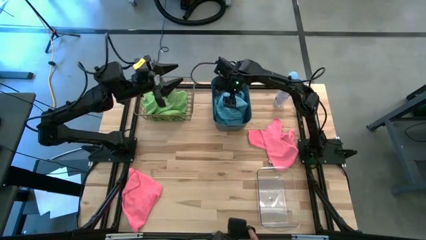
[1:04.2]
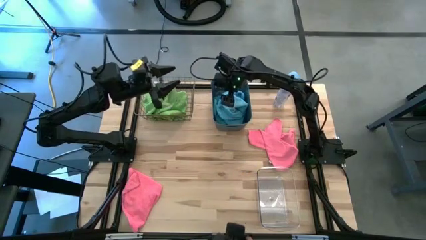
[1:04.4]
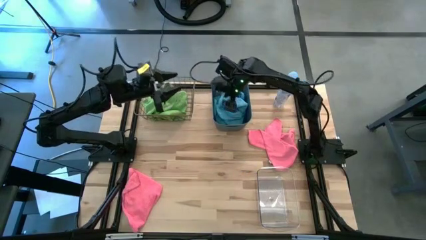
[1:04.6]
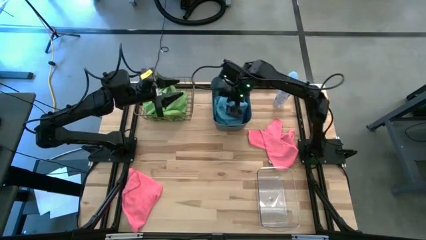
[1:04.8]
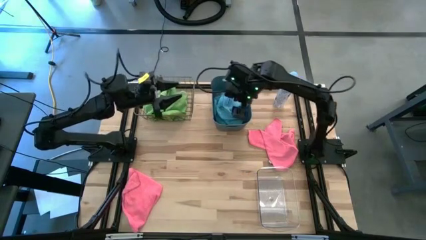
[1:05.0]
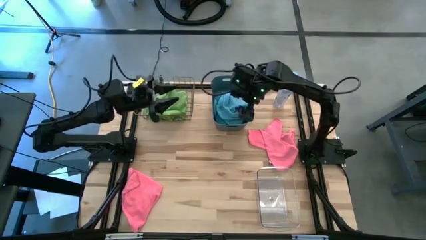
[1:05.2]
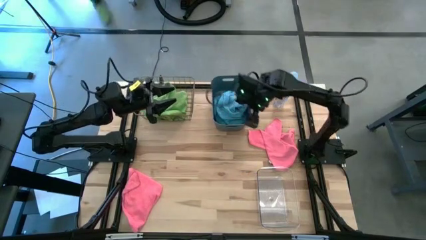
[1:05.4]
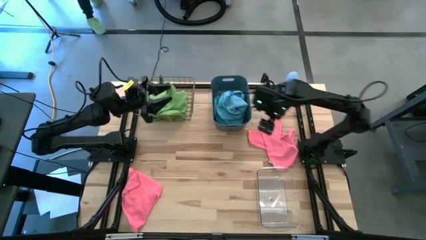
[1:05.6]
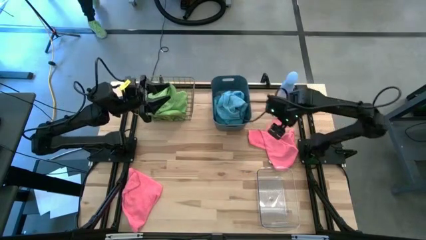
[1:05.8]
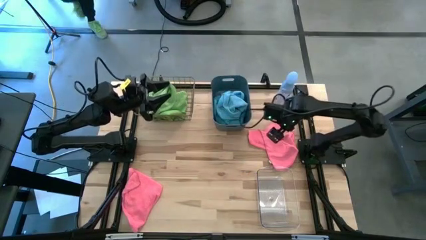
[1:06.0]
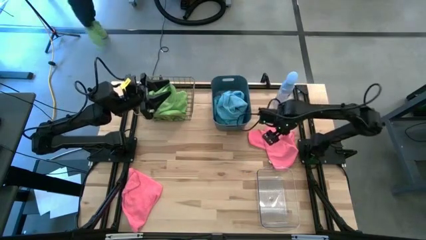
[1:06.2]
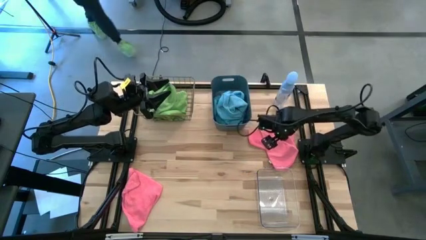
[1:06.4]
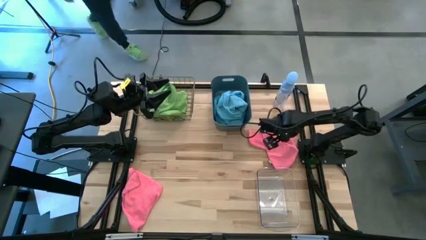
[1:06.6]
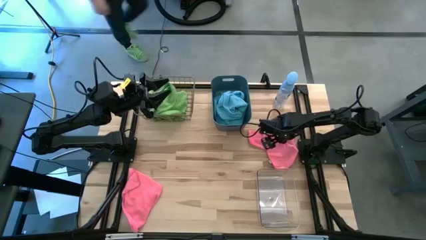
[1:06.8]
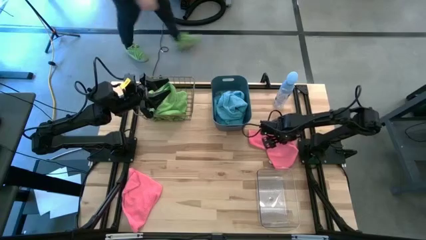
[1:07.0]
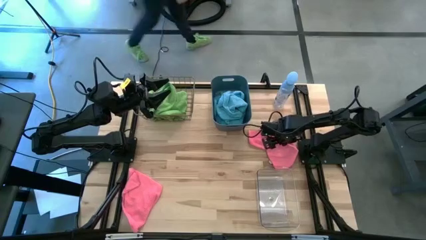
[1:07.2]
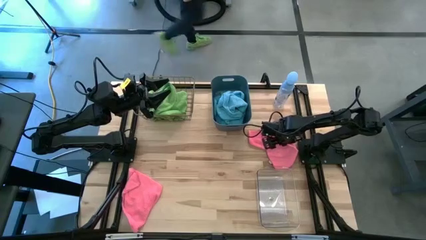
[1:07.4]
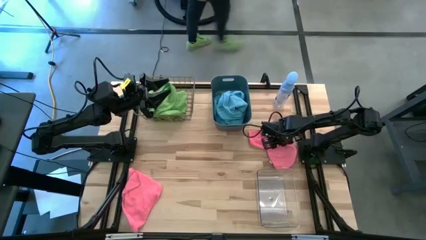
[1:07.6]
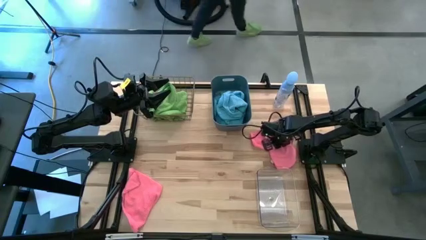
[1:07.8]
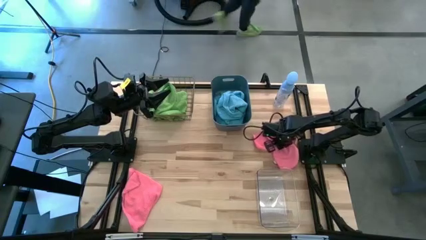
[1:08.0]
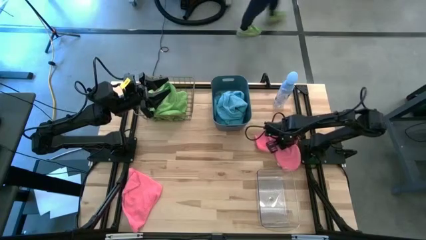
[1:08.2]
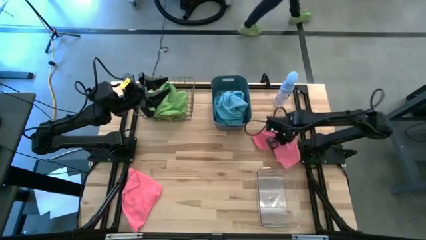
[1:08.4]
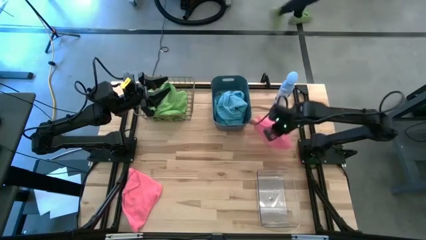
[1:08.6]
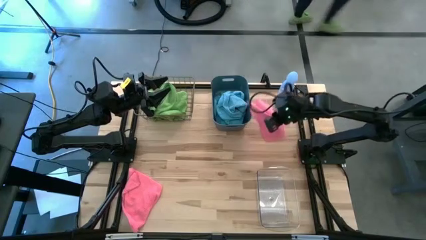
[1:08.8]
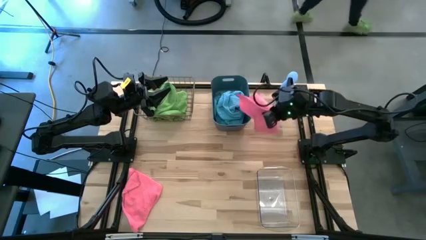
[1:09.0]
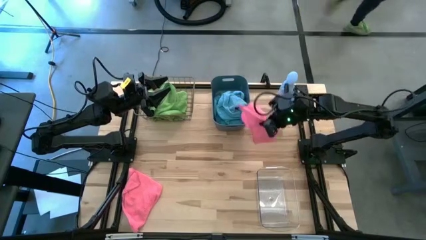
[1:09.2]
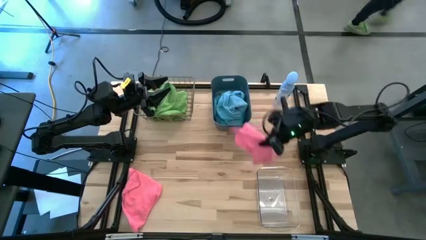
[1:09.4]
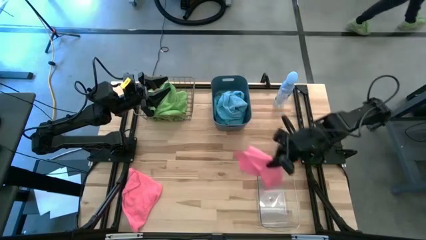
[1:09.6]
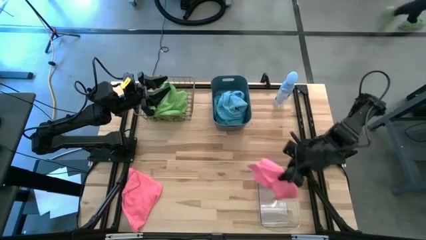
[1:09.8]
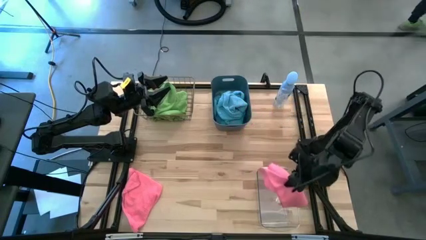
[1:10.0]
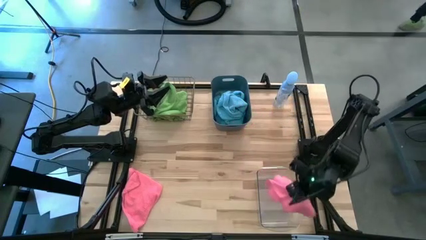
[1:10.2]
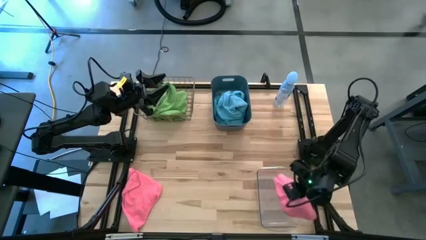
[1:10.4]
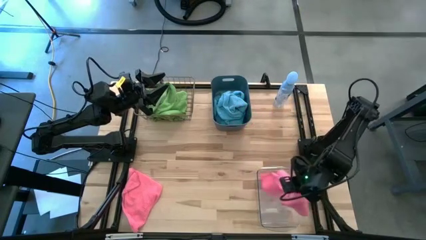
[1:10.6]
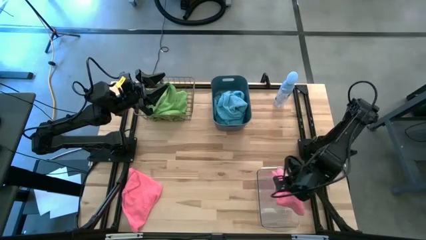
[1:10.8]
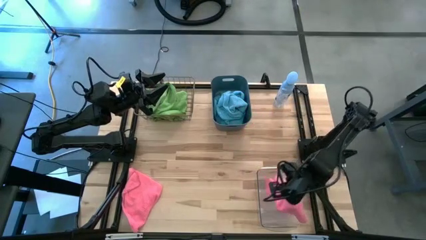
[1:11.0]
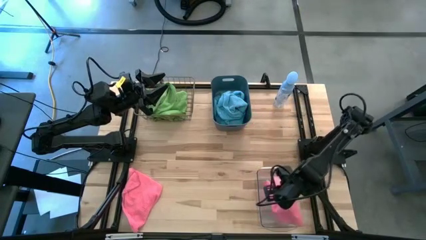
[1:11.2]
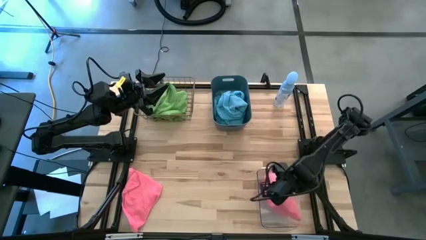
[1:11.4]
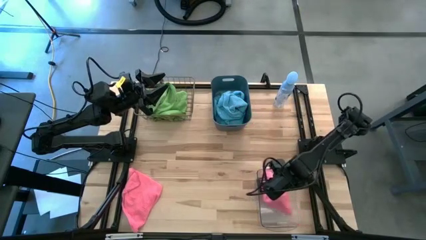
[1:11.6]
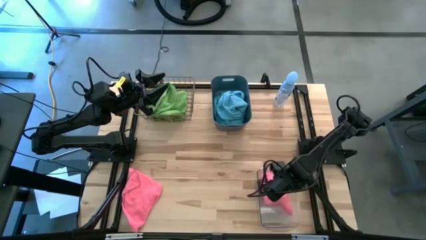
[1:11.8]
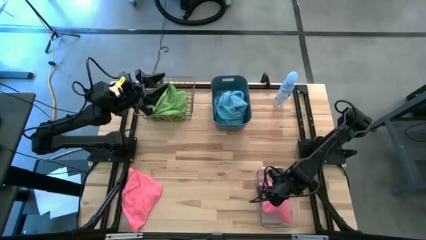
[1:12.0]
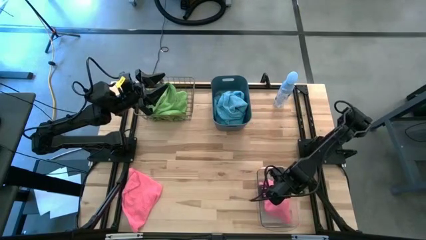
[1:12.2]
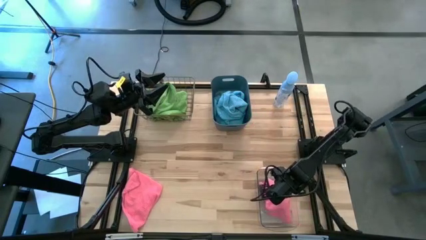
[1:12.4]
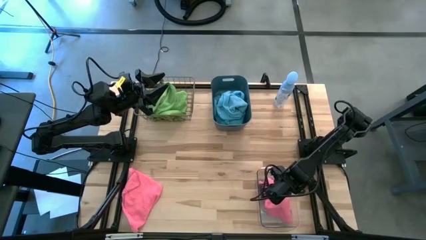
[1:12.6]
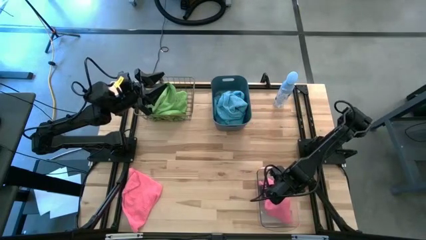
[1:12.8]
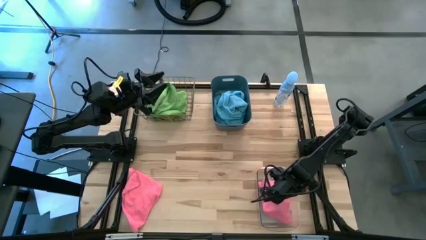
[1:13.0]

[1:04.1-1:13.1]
Task: Sort microfiber towel by color & place in baskets
Put the top pink microfiber cloth into the transparent bin

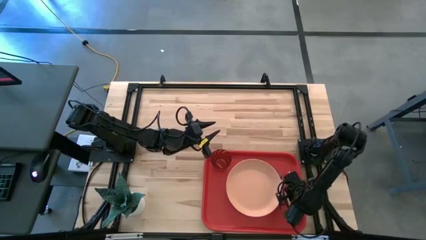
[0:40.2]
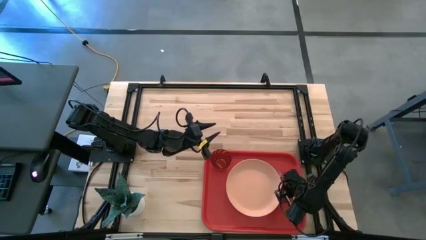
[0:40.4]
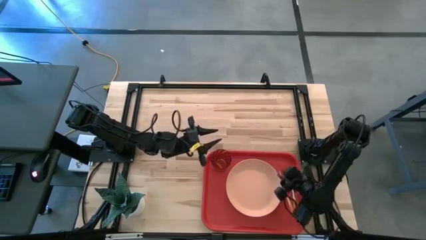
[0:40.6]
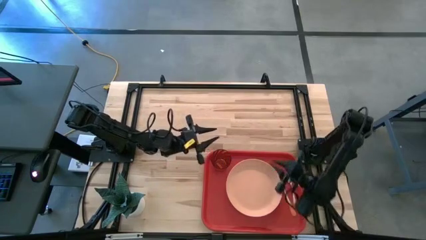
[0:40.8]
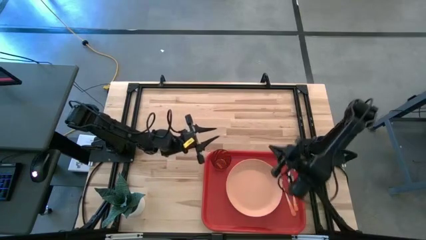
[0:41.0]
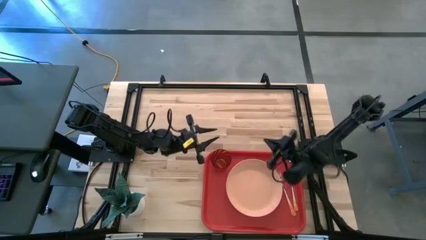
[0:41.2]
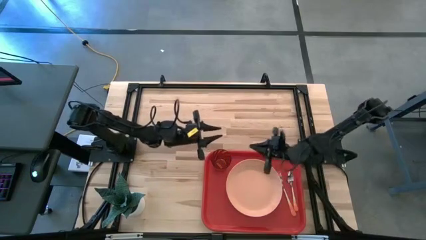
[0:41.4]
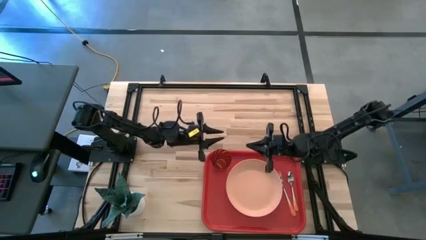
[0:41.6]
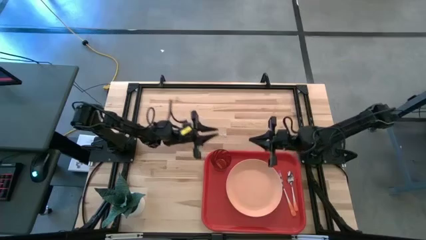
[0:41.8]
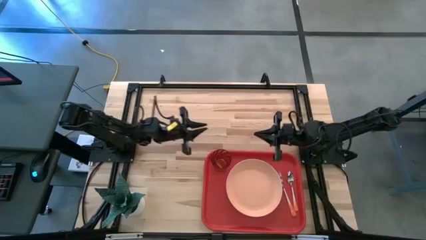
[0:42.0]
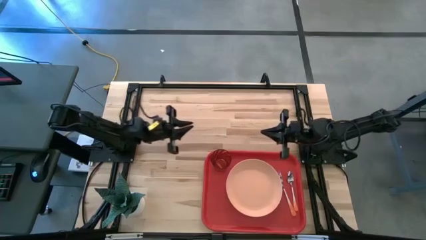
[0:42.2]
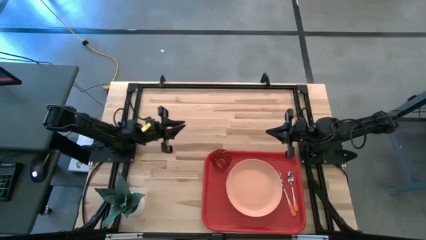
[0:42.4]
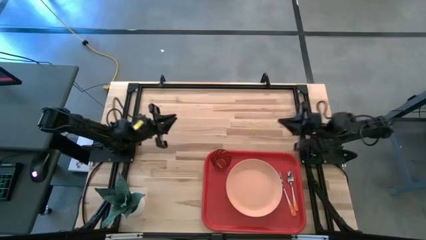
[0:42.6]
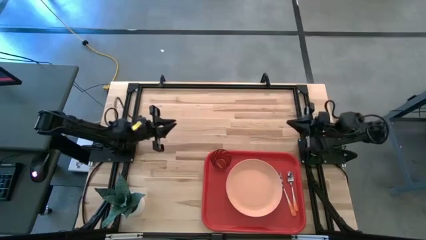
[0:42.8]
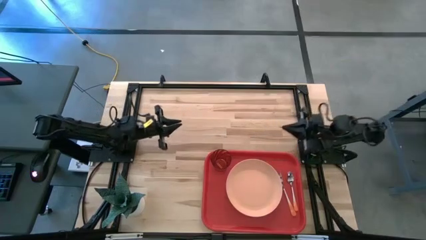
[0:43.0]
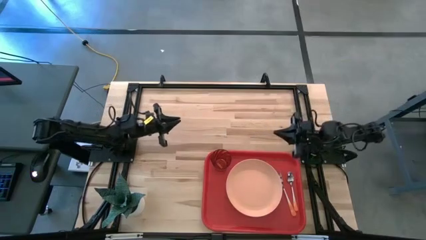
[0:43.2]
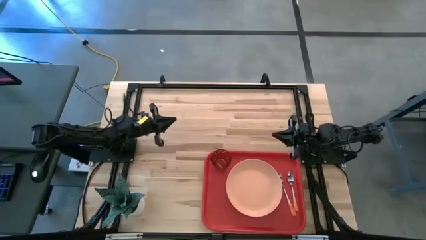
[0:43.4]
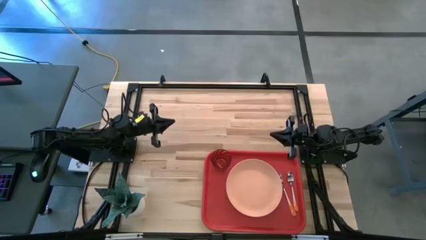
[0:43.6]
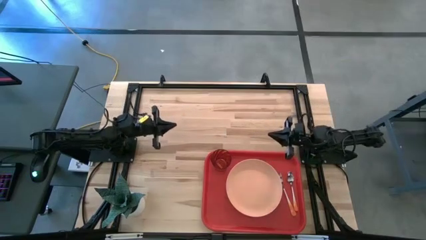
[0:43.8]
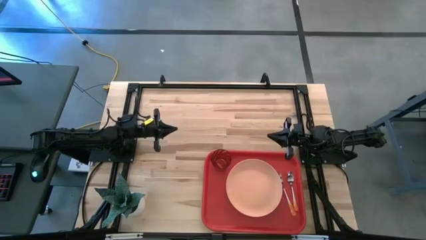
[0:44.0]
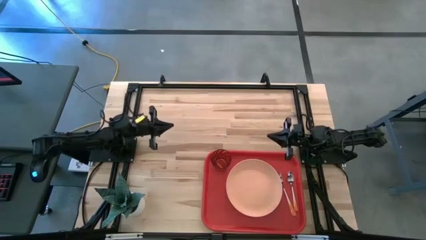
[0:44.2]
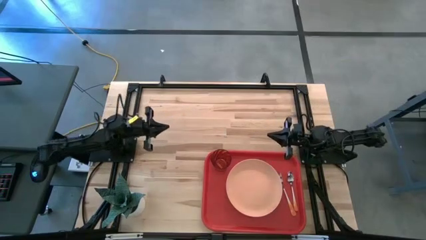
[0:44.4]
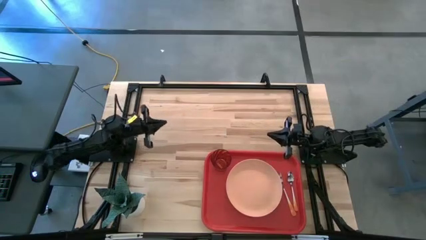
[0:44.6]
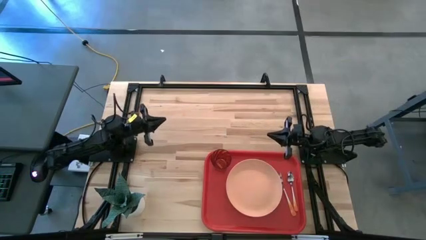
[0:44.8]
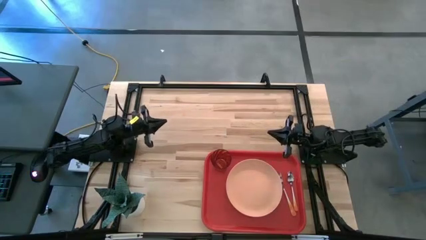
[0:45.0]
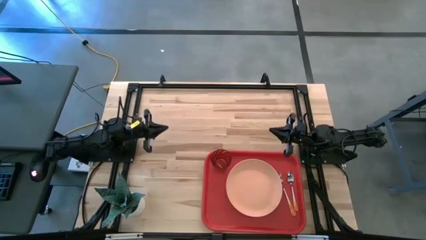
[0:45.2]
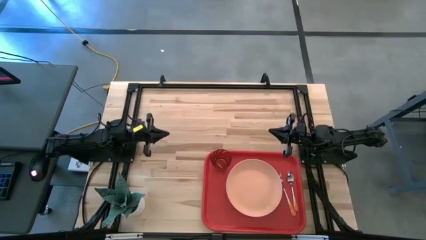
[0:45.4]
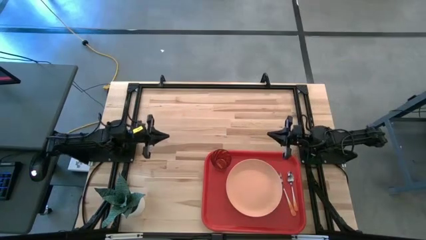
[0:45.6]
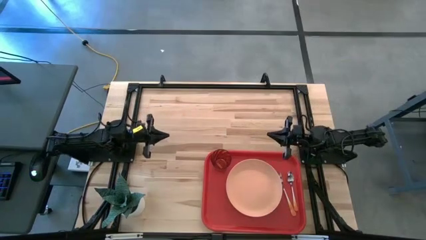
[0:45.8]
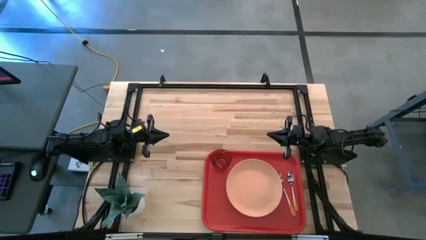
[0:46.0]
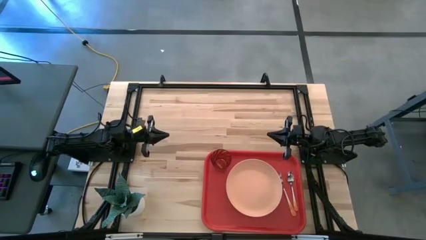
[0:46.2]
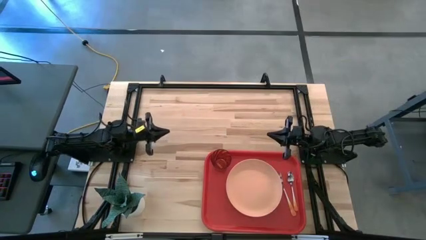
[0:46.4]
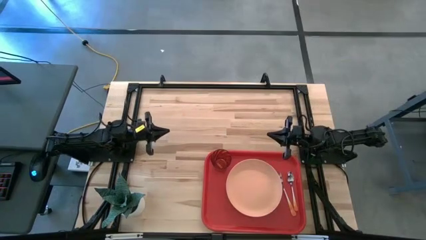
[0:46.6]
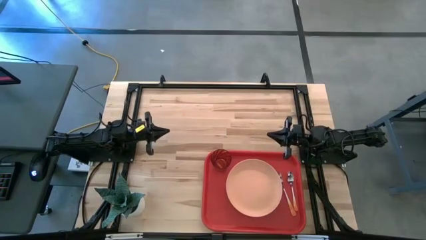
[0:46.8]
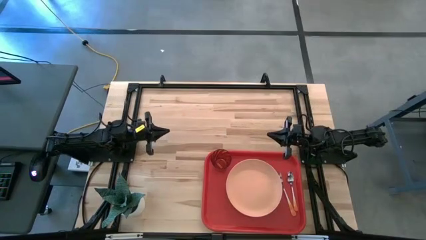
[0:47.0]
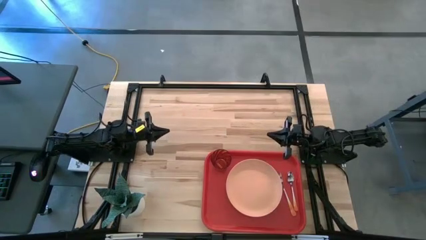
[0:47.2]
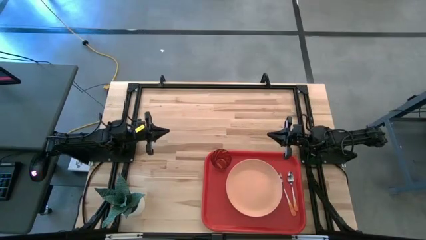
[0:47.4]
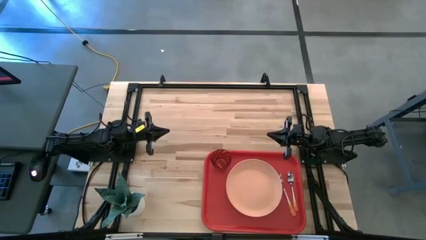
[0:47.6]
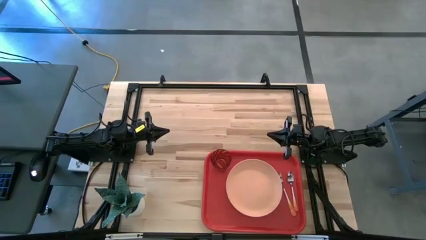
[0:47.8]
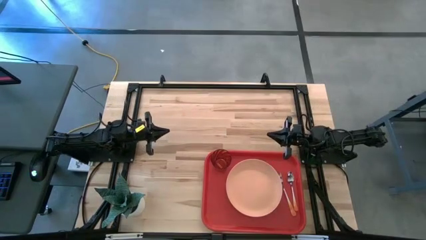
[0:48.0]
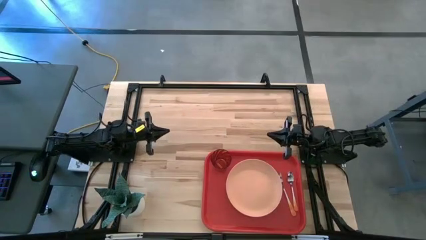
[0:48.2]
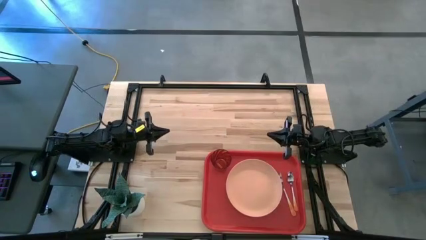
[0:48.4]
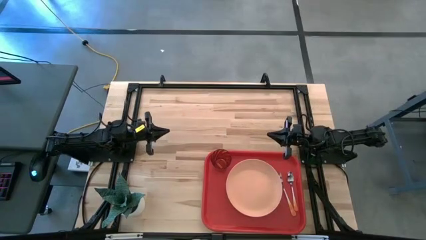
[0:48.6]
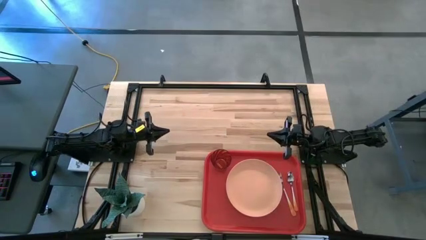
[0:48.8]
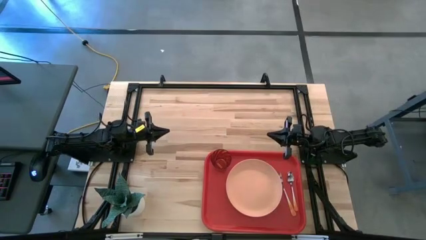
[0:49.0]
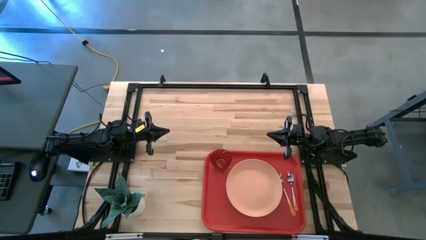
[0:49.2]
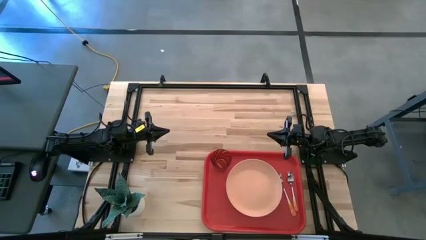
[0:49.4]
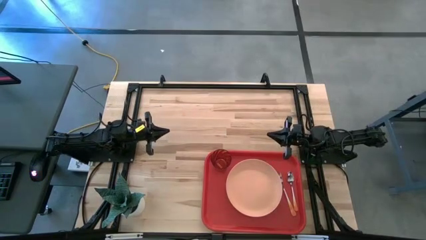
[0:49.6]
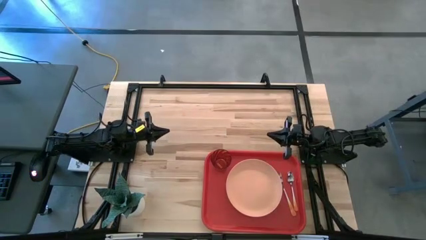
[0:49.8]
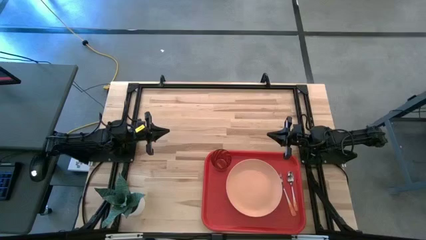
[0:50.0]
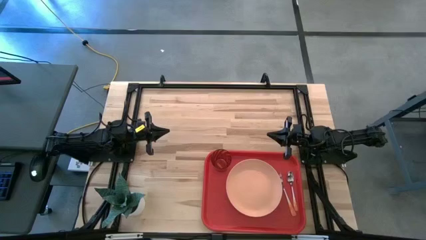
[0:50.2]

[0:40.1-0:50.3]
Task: Pick and place plate/cup/fork/spoon on tray
Return to Home Position
